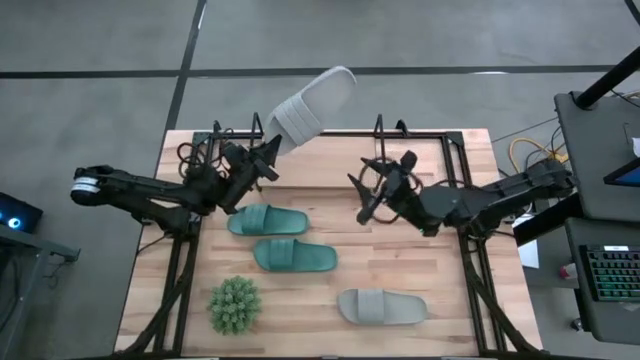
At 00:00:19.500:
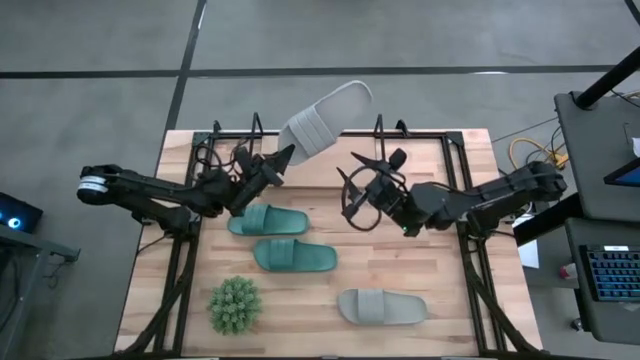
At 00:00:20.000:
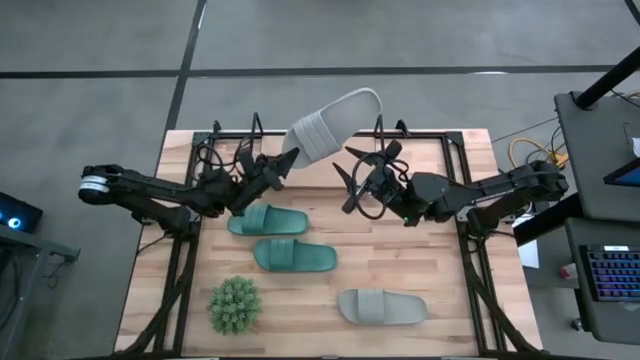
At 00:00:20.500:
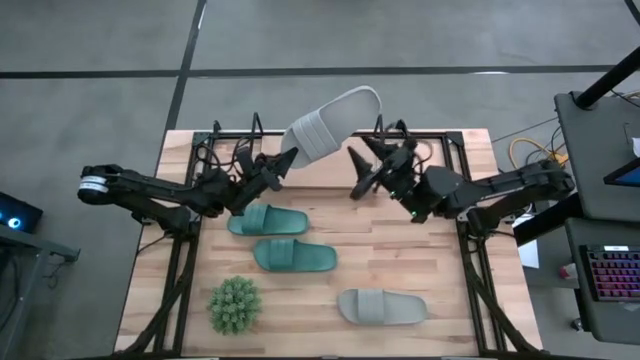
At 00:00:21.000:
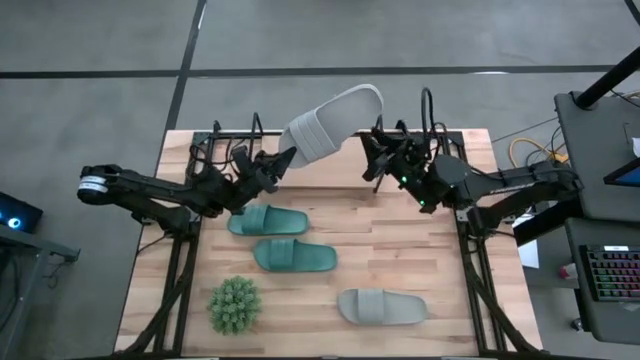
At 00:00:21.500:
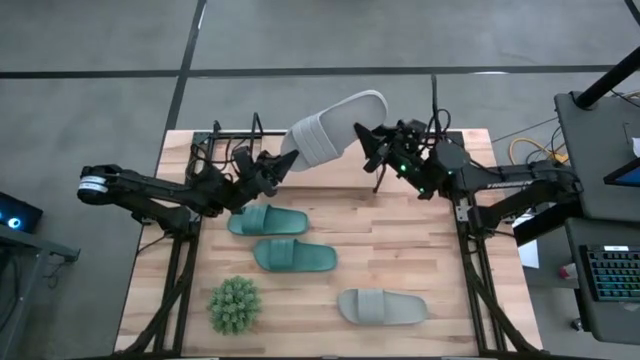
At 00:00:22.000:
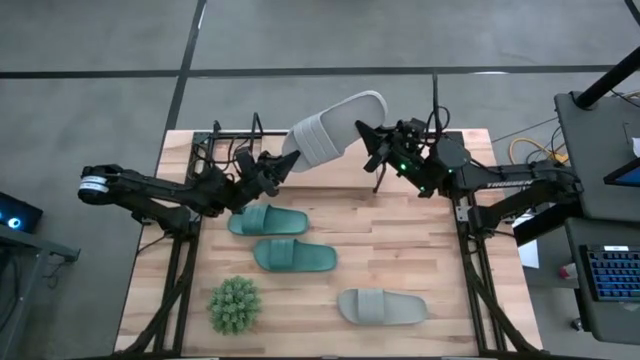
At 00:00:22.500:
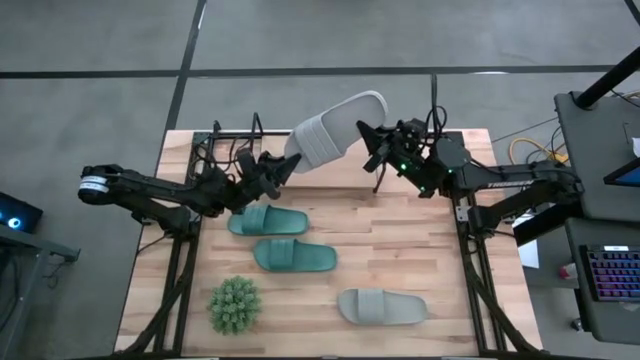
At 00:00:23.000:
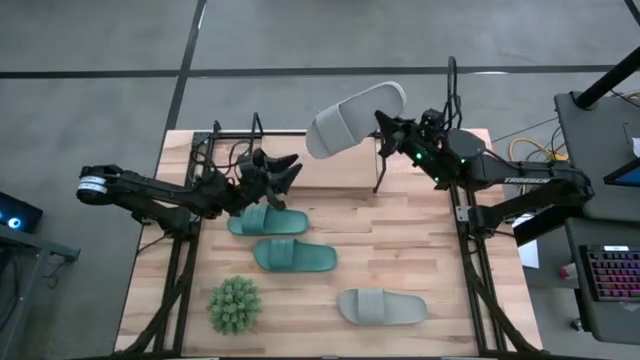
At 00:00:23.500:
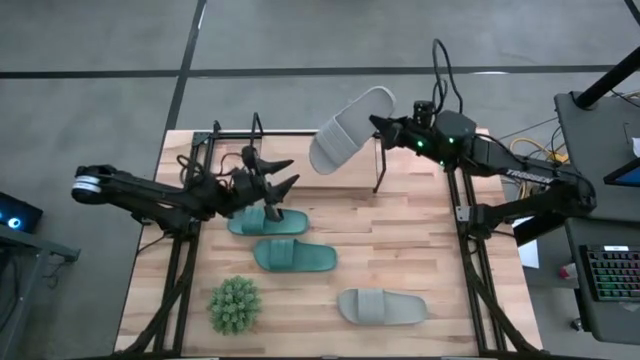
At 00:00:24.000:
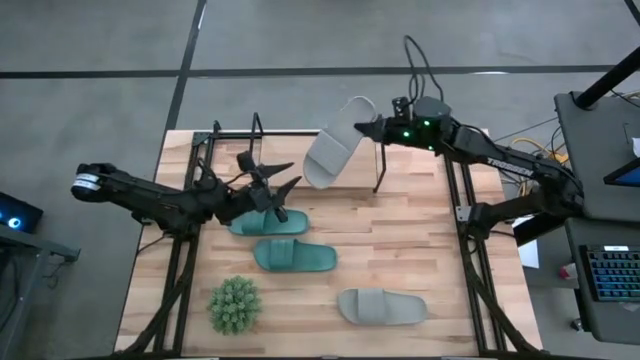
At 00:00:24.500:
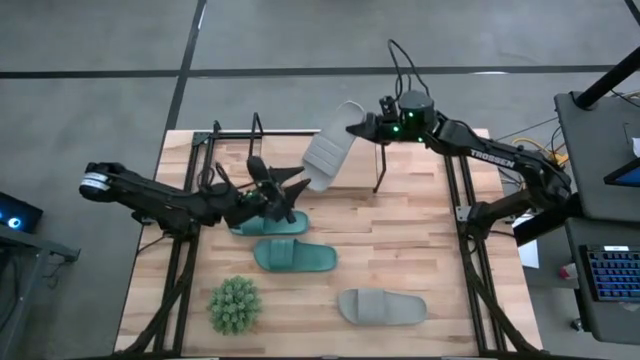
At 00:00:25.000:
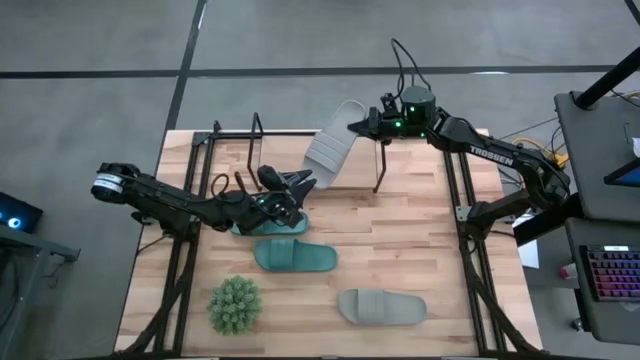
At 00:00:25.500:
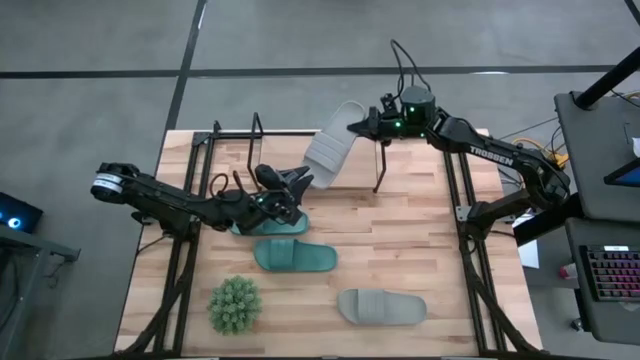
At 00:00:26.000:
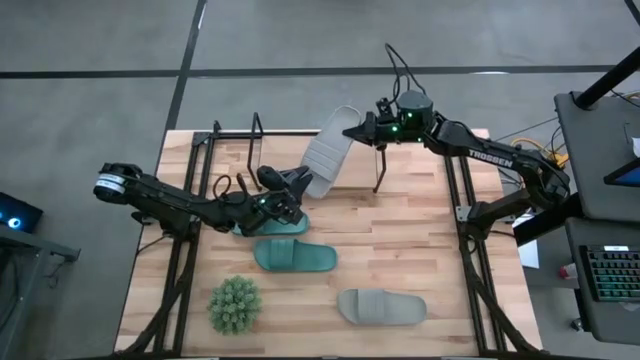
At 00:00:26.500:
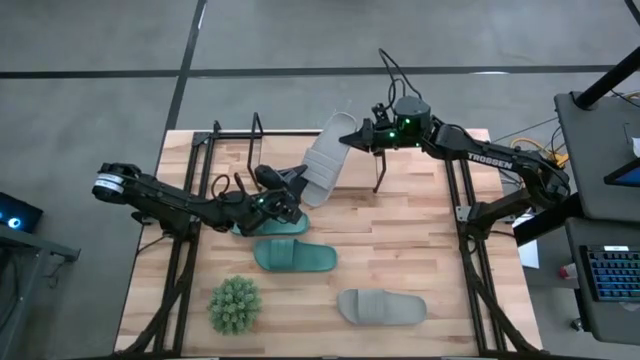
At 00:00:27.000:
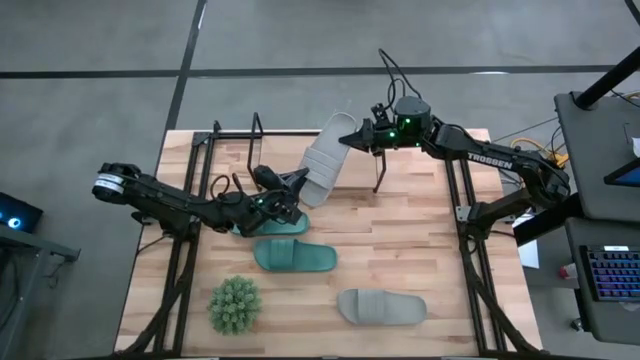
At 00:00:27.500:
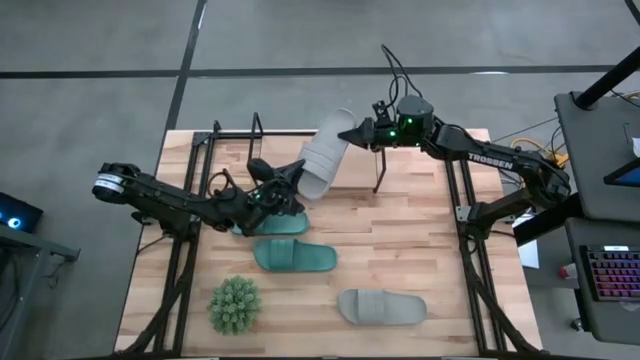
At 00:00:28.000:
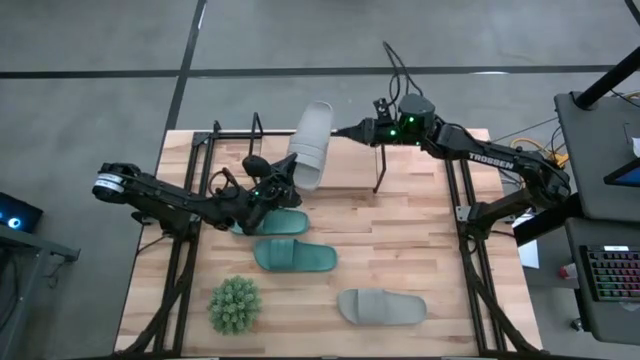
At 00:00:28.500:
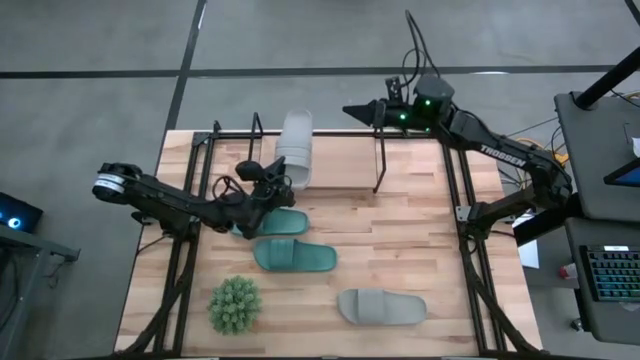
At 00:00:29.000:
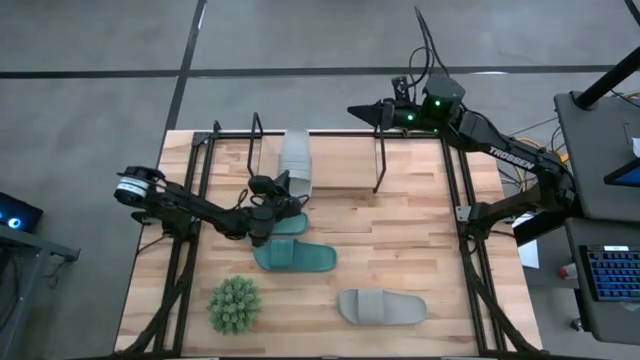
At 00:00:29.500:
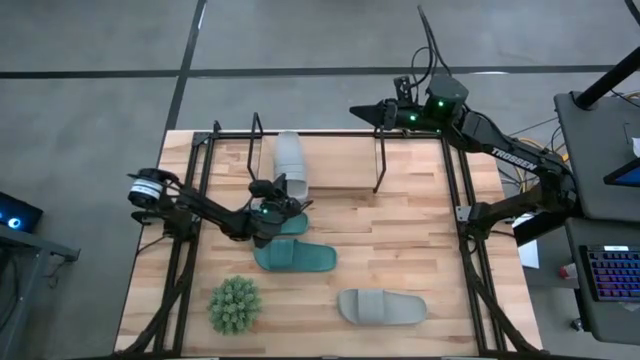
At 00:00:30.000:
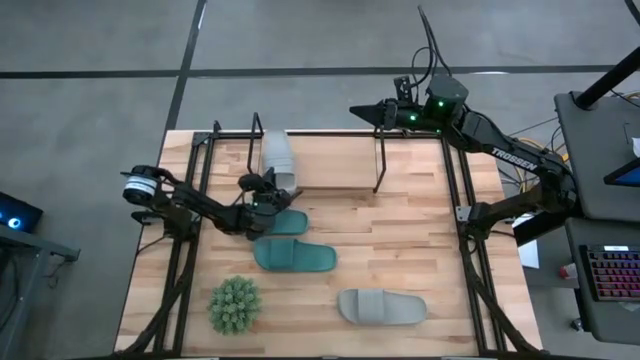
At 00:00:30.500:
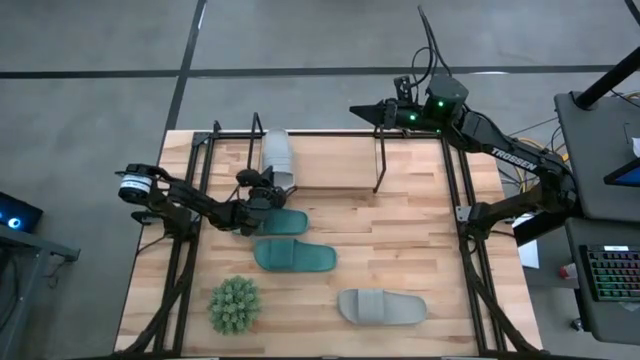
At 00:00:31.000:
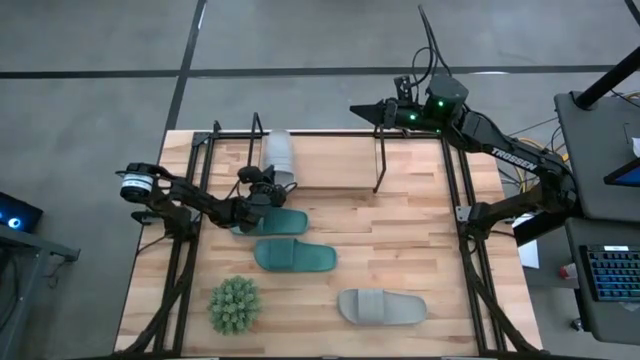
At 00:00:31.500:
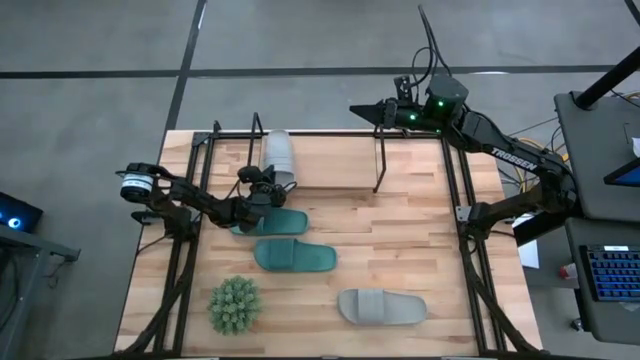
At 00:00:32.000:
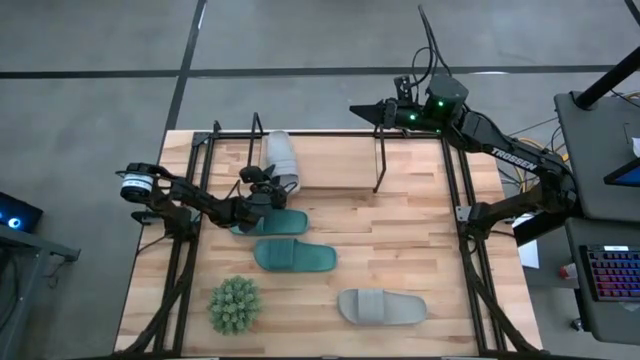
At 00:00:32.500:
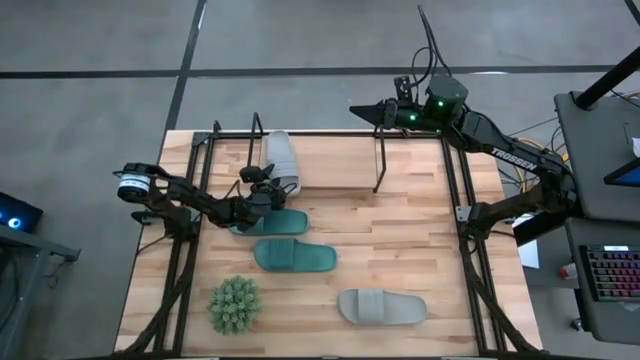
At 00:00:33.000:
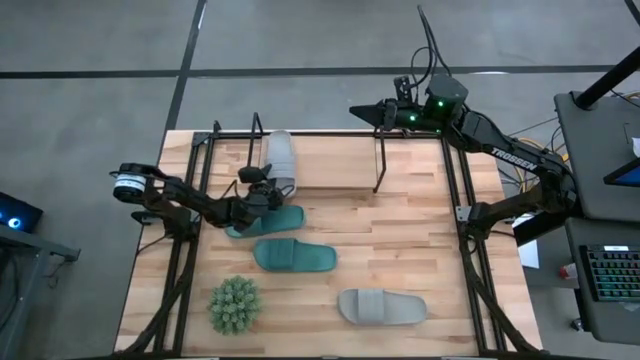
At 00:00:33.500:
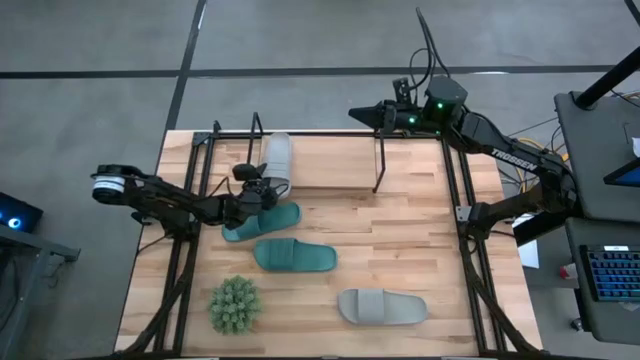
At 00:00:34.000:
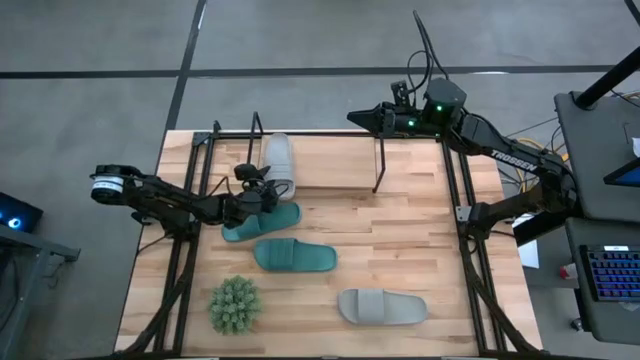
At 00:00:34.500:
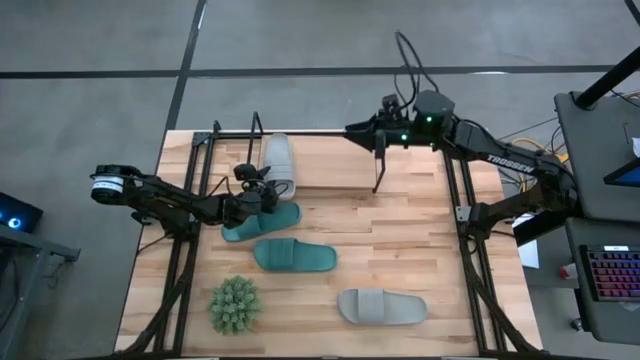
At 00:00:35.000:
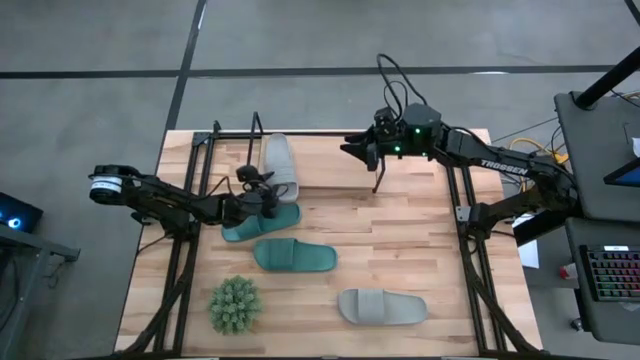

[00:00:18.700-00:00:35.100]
Task: Pick and place slides into the shelf
Put the top gray slipper on the shelf

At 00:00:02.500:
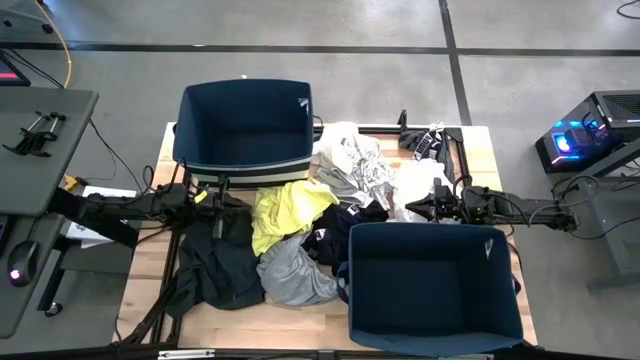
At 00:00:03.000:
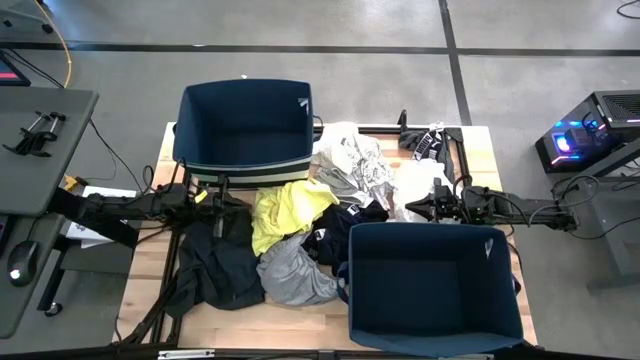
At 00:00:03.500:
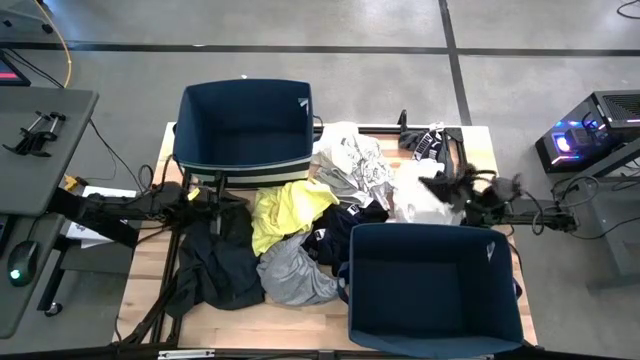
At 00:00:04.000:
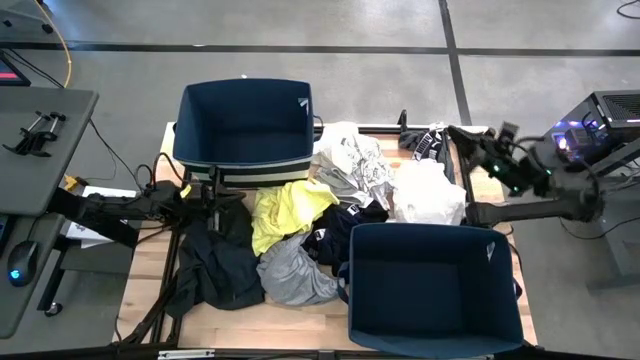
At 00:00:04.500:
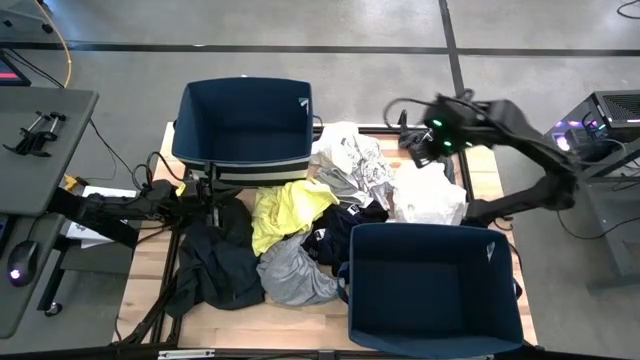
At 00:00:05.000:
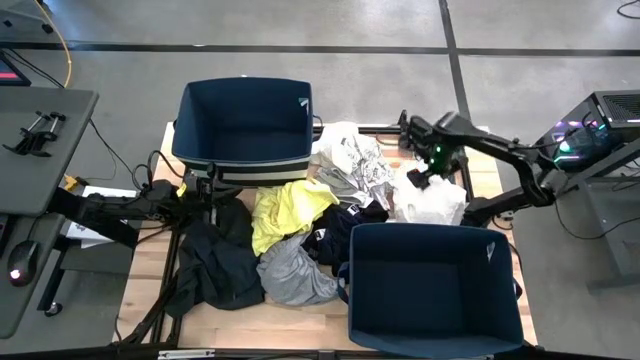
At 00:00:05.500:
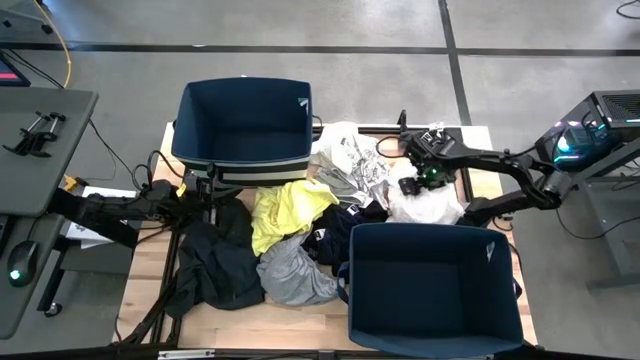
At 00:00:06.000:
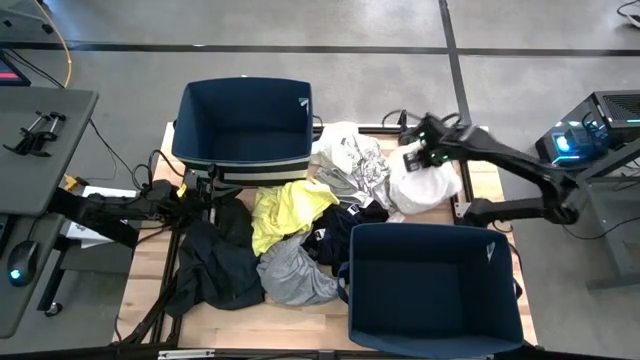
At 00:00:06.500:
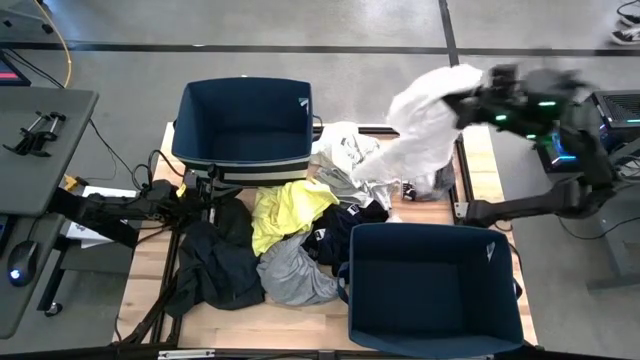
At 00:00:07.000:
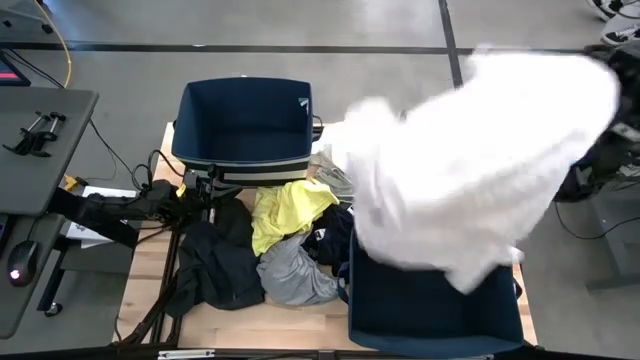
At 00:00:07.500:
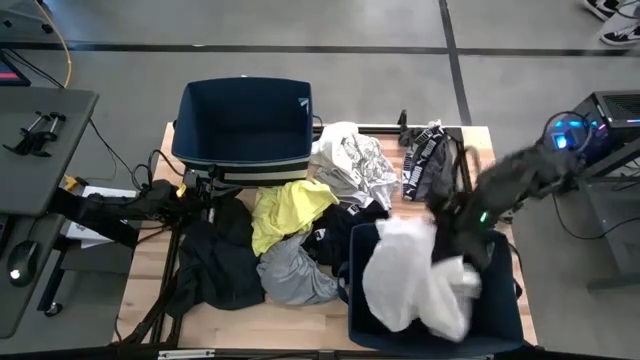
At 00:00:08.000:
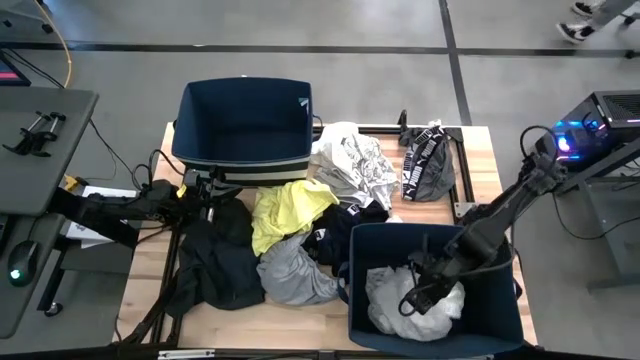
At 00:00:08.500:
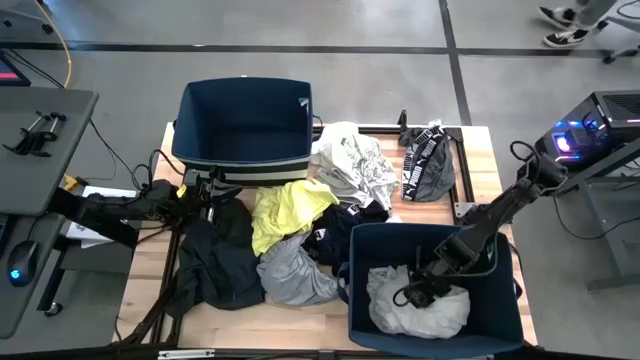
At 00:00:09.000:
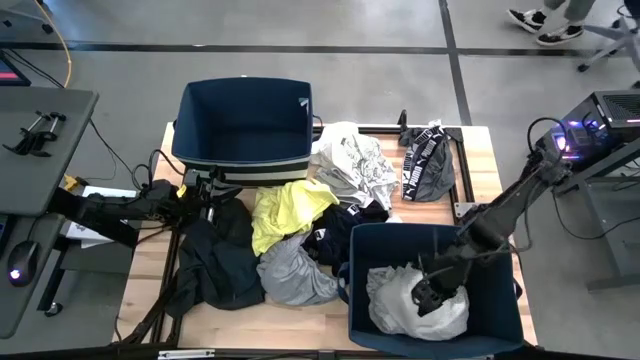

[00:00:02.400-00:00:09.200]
Task: Sort clothes
Put the white cloth into the bottom blue laundry bin
